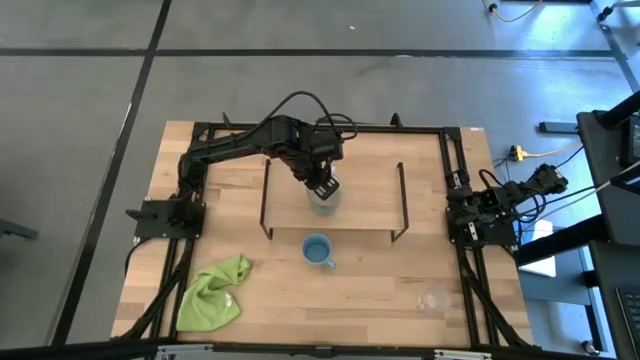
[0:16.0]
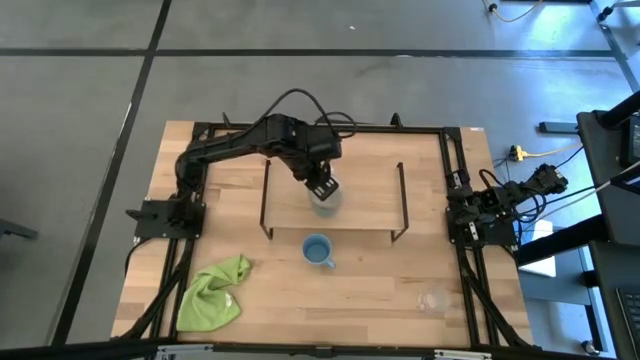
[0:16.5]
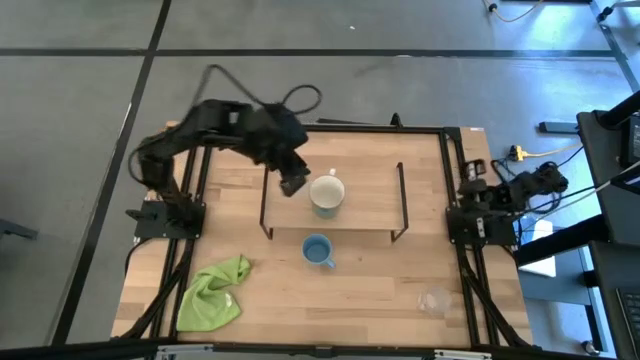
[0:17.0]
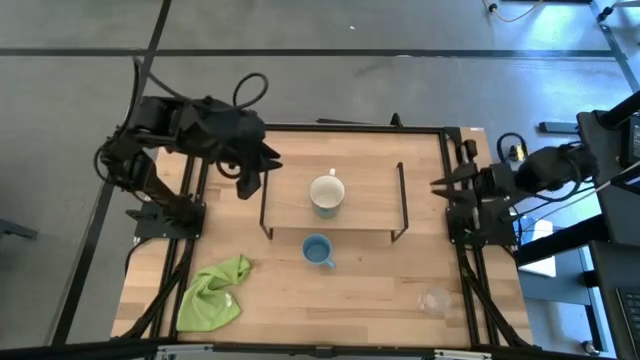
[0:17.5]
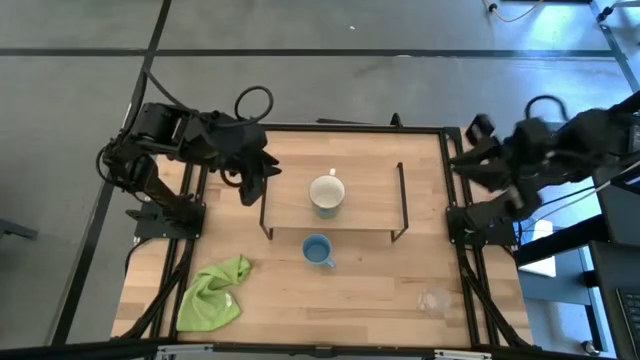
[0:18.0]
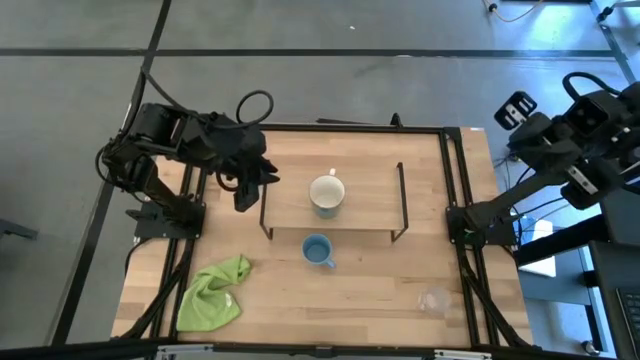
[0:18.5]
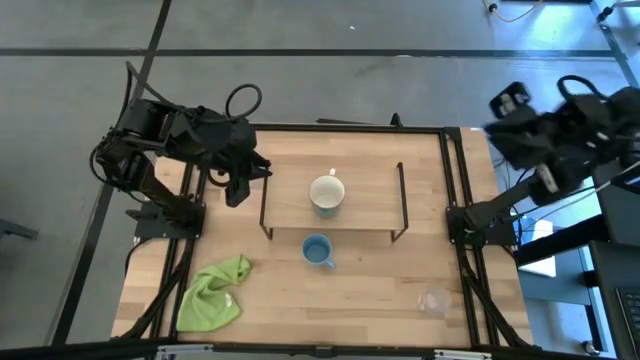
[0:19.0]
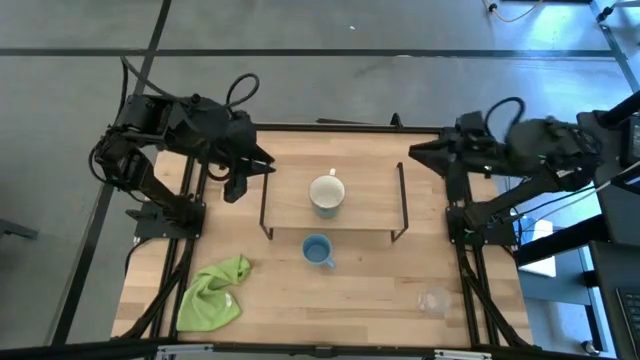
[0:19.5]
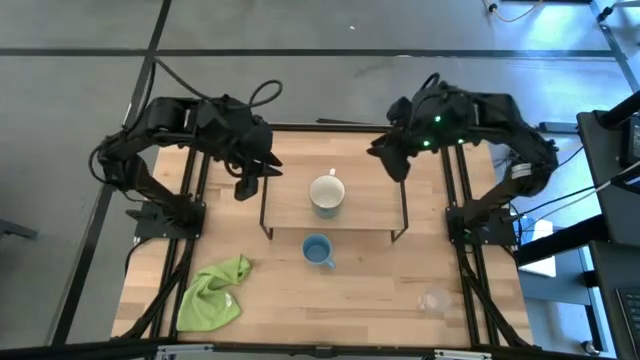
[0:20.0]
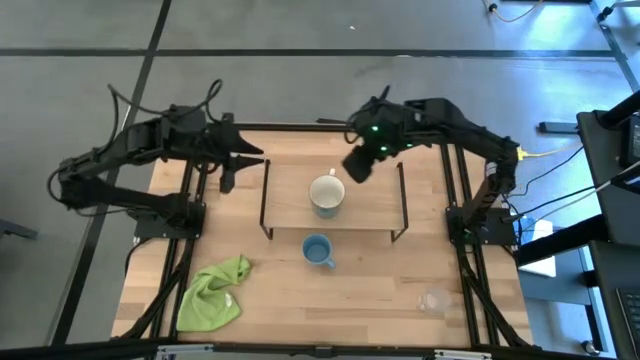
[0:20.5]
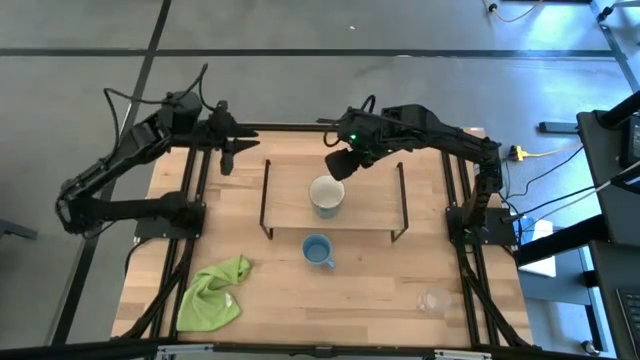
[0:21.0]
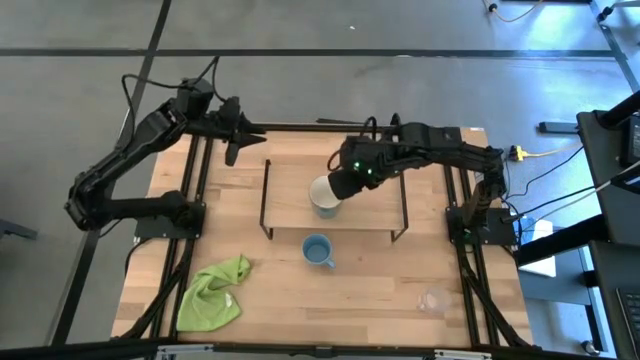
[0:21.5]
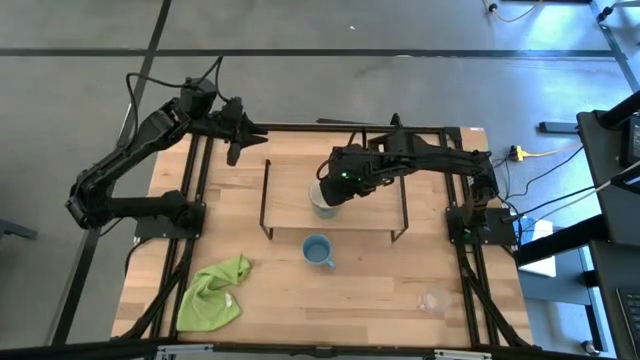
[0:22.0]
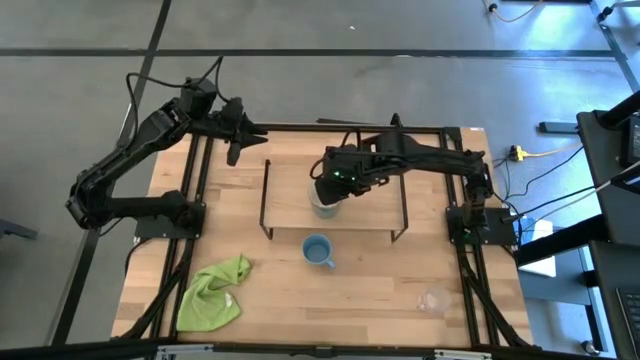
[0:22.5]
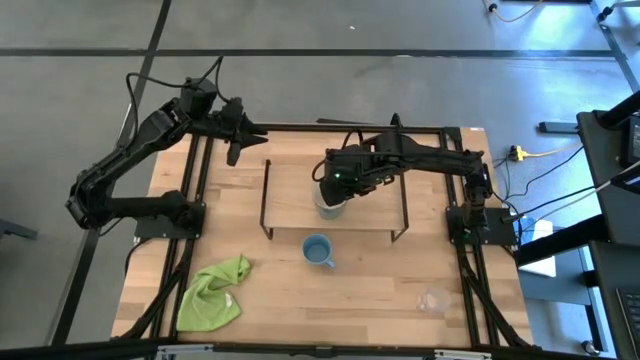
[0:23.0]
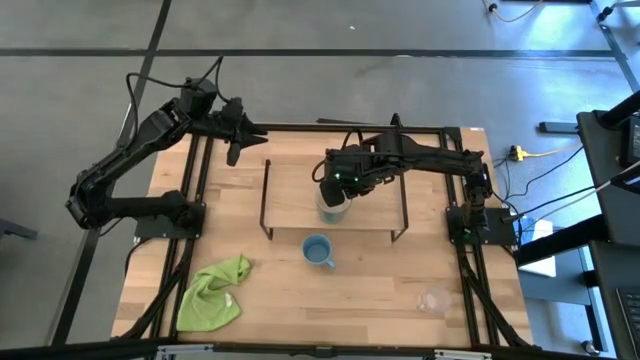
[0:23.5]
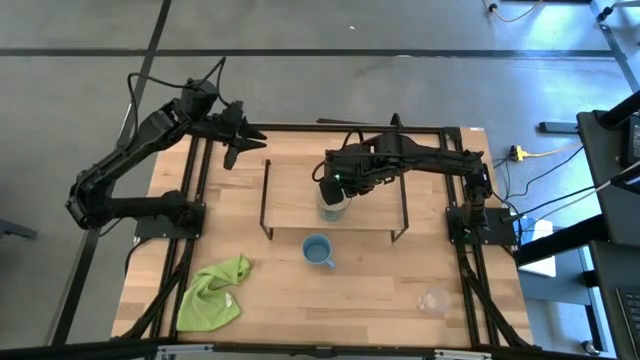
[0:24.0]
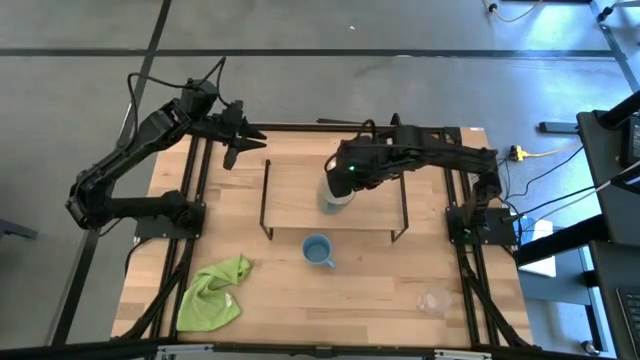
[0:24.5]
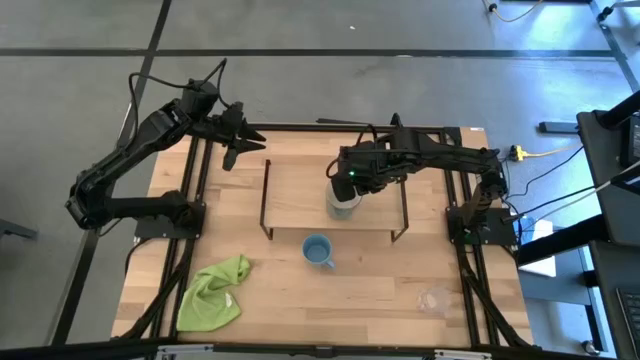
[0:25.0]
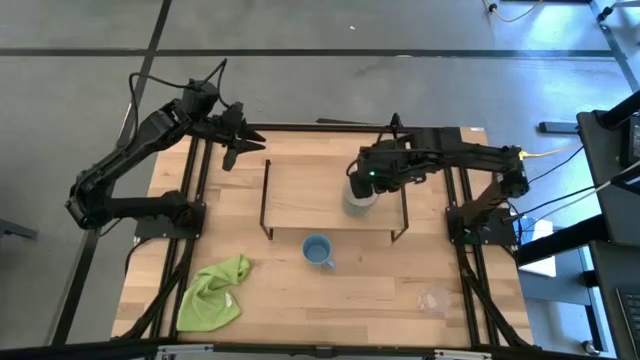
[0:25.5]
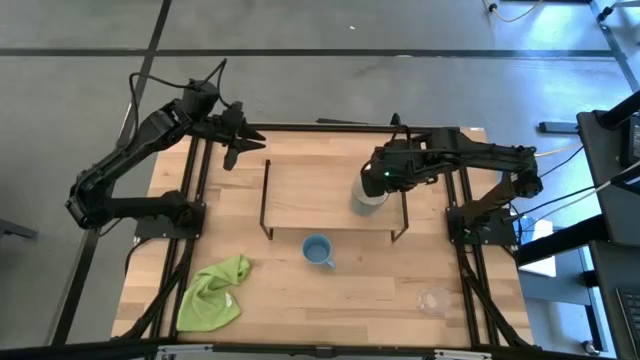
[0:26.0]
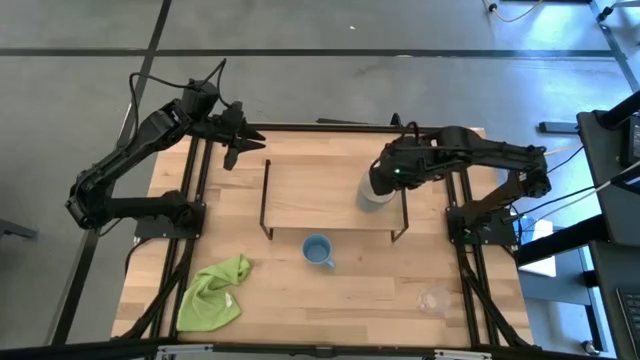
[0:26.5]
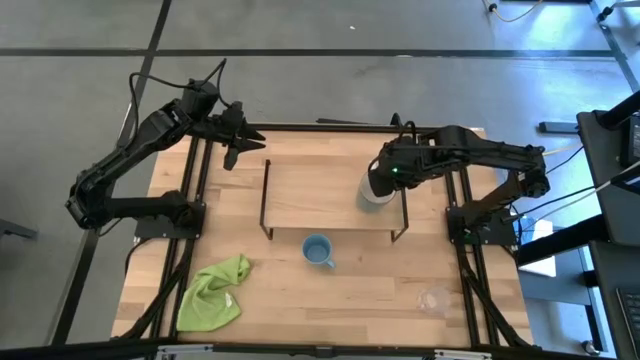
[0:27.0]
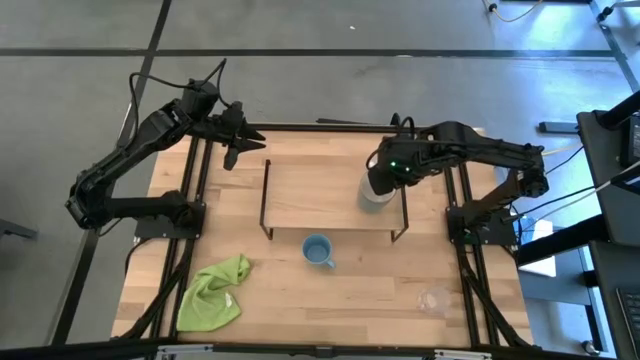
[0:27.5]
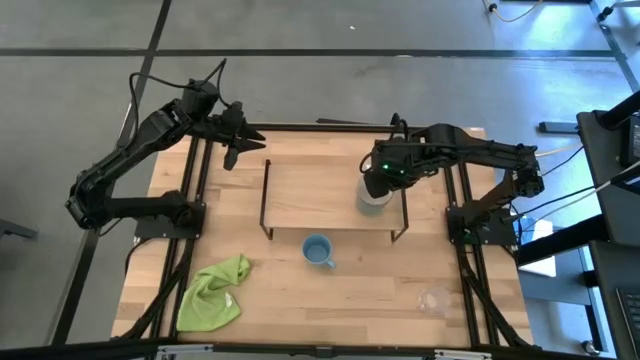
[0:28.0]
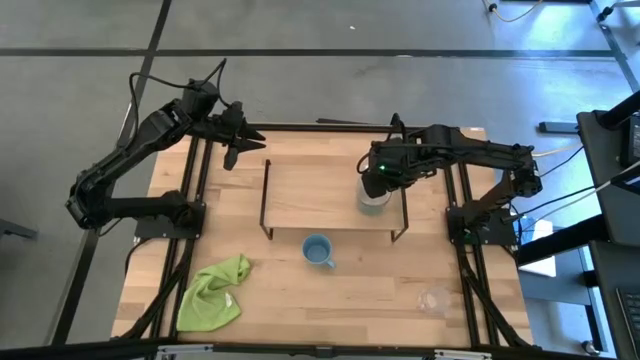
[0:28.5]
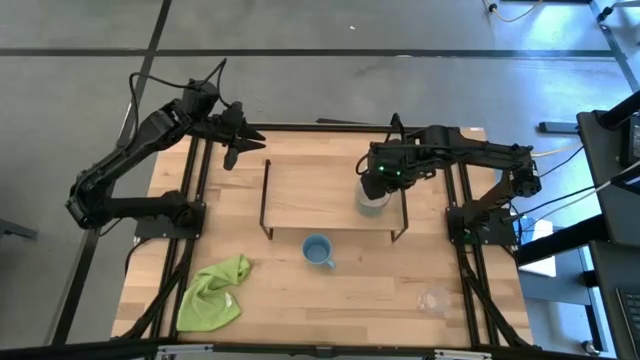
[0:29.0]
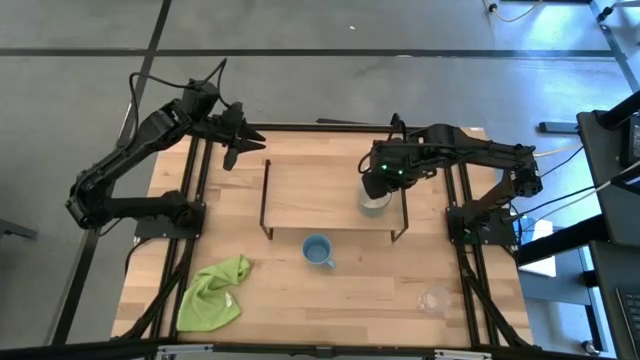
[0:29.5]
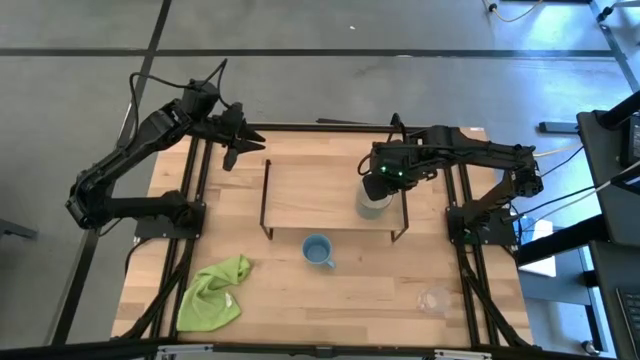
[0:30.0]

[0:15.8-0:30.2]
Task: Stack small to large cups/mugs on shelf
Put the light blue mug on the shelf

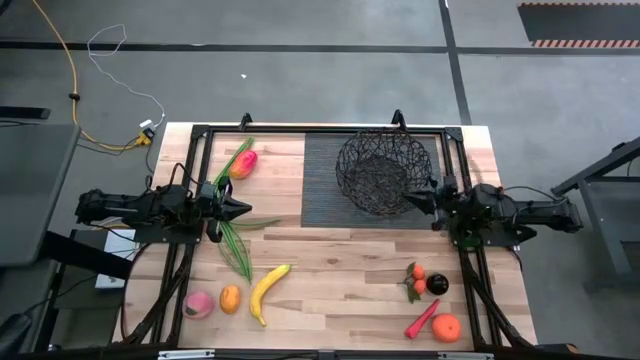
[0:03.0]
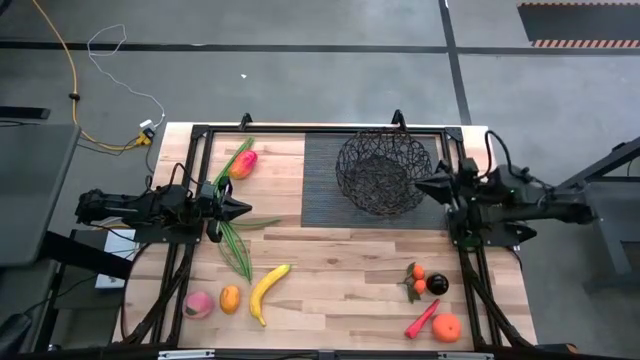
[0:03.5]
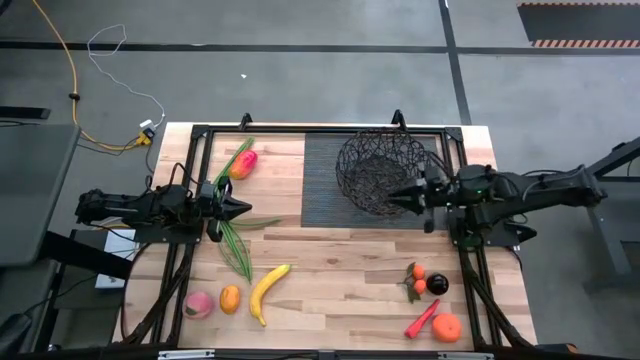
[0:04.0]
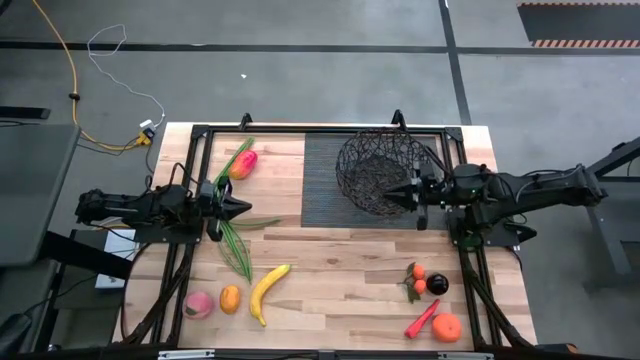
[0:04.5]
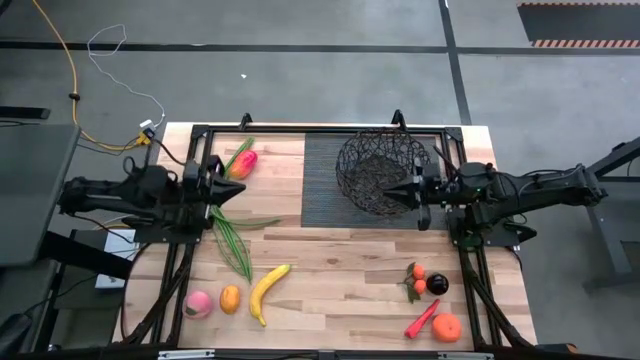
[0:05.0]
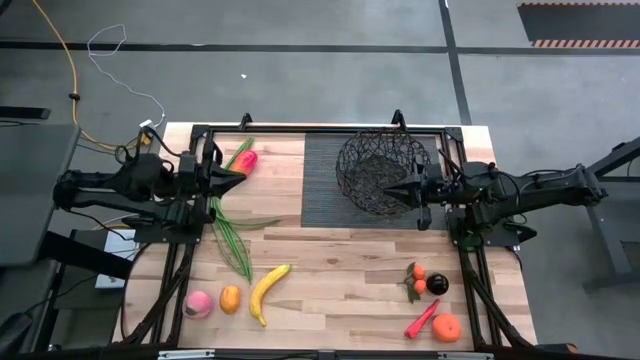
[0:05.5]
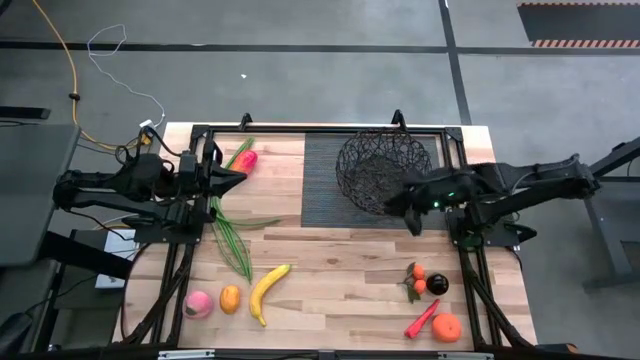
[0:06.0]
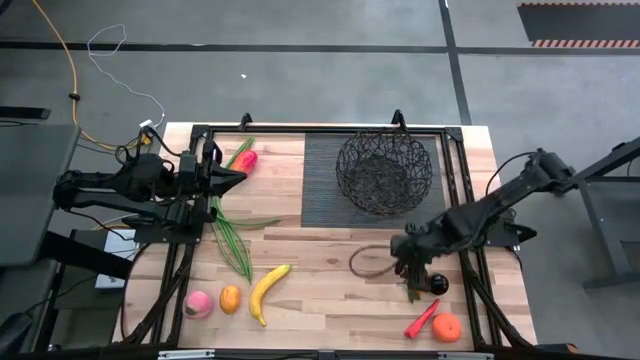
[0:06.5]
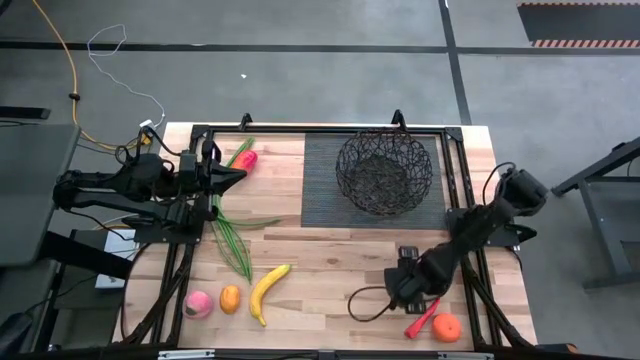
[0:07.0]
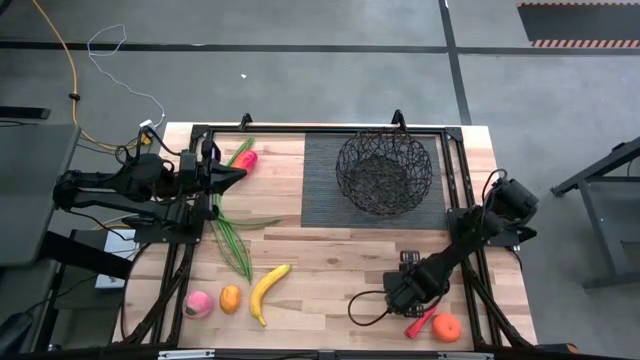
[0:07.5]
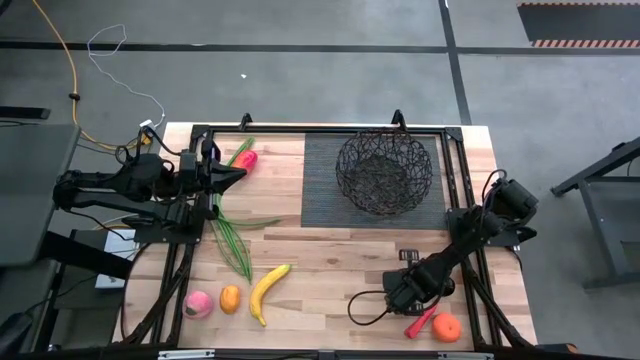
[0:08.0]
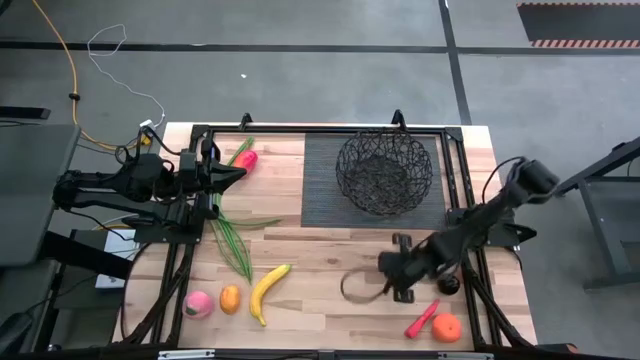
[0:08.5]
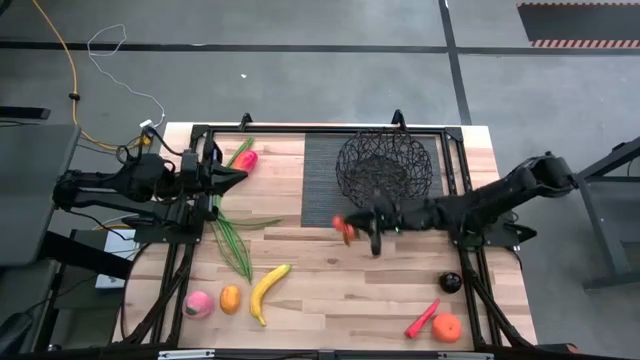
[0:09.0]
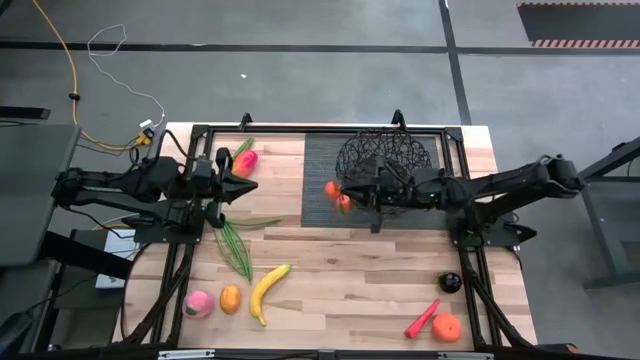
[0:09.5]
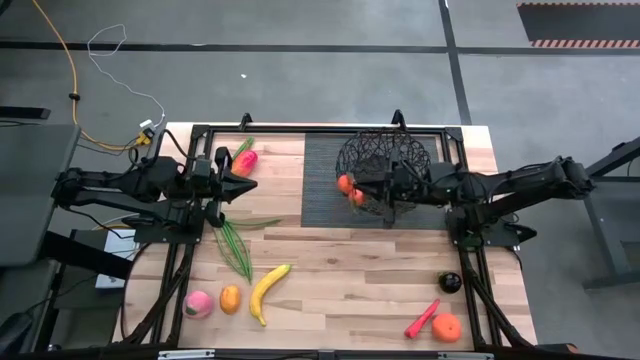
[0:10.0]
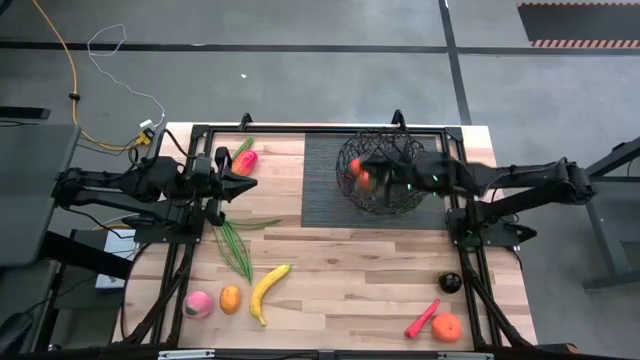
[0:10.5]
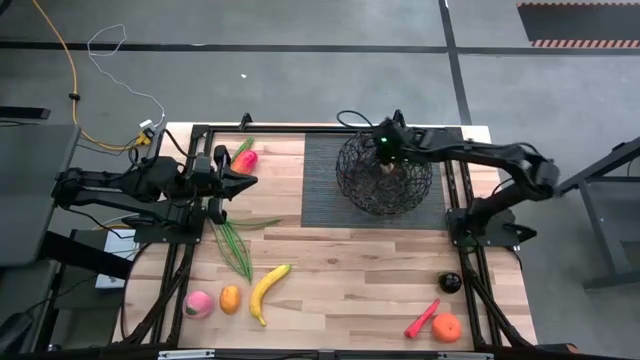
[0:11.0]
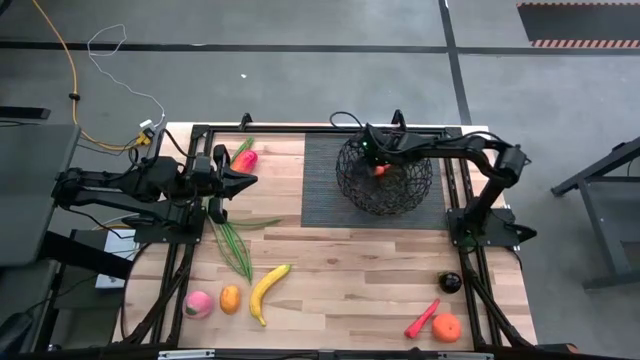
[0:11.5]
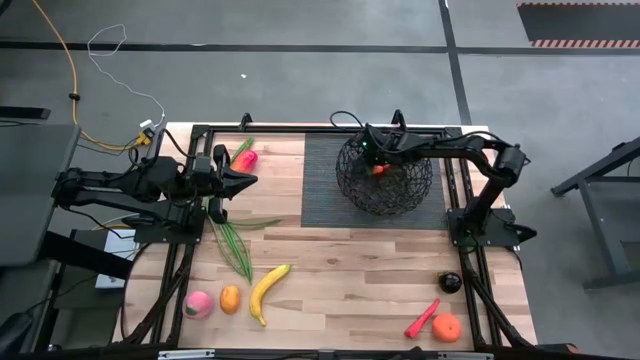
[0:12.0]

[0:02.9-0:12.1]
Task: Build produce basket
Put the tangerine into the black basket
